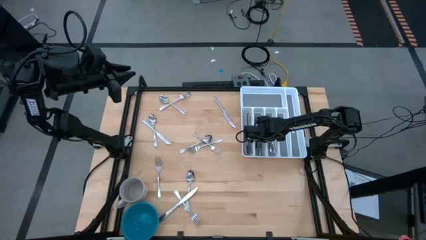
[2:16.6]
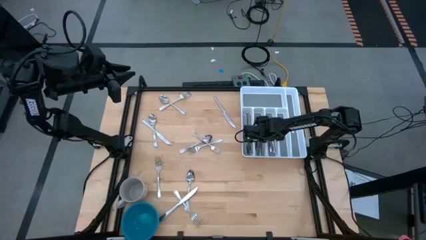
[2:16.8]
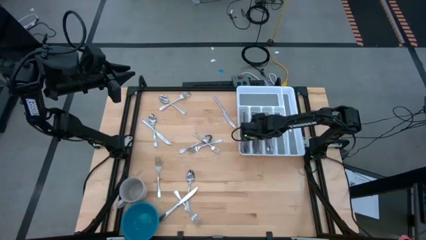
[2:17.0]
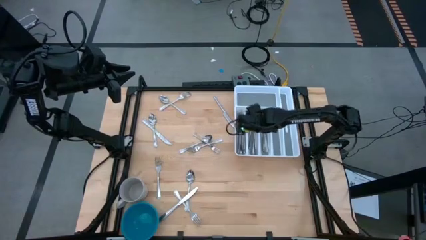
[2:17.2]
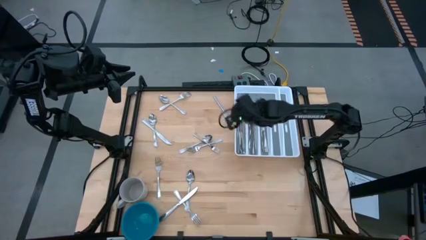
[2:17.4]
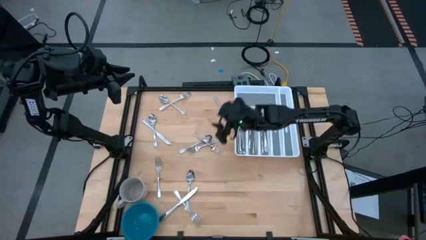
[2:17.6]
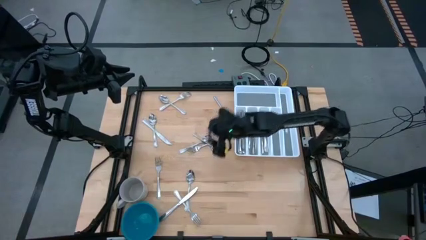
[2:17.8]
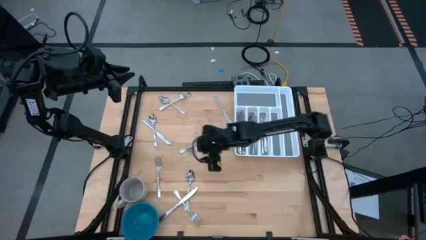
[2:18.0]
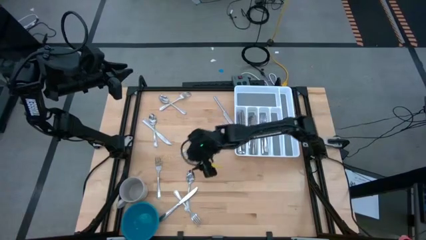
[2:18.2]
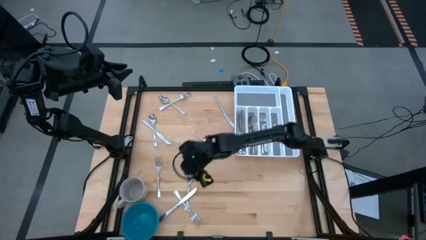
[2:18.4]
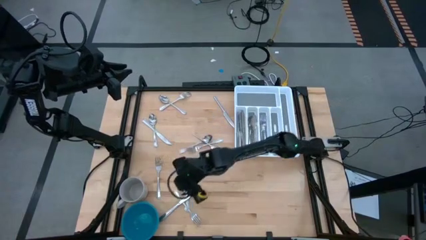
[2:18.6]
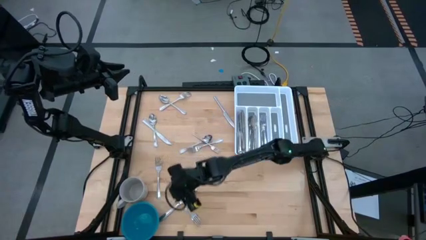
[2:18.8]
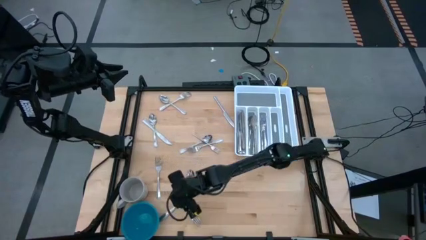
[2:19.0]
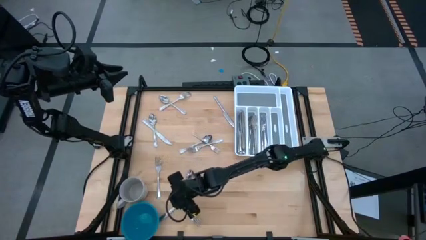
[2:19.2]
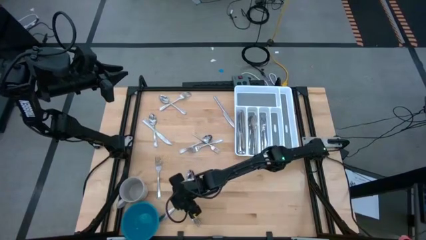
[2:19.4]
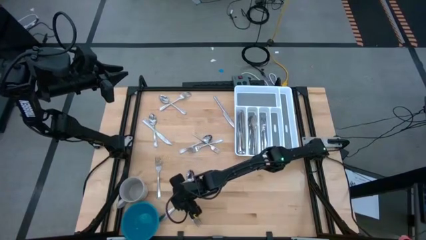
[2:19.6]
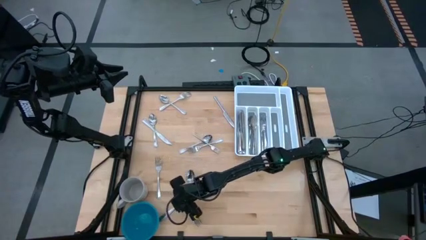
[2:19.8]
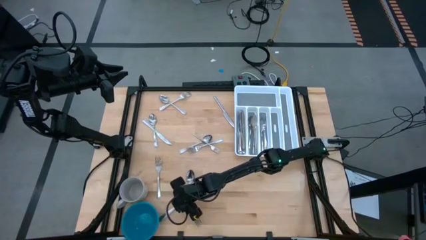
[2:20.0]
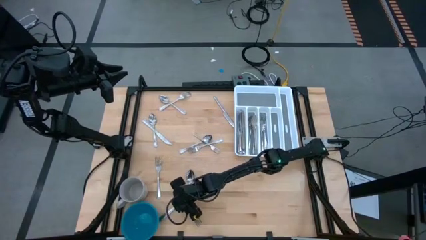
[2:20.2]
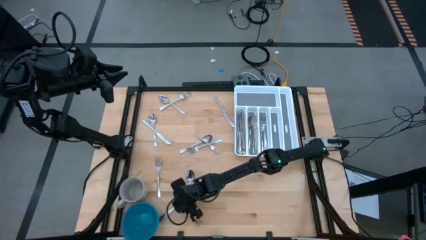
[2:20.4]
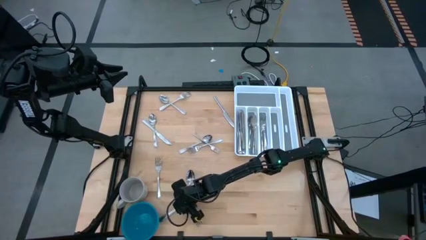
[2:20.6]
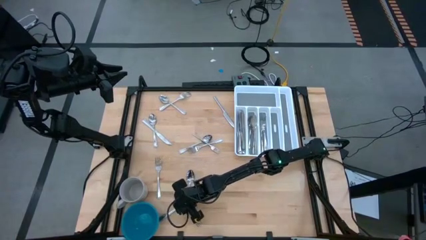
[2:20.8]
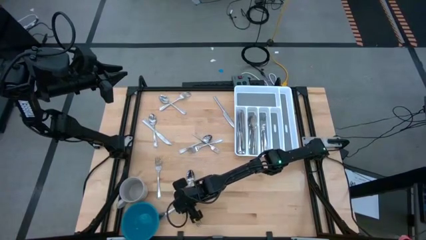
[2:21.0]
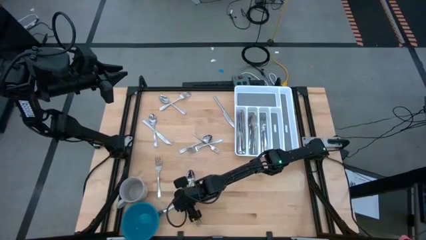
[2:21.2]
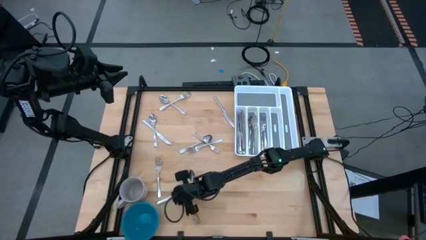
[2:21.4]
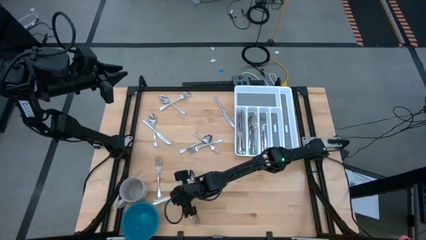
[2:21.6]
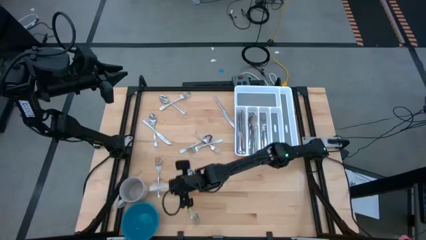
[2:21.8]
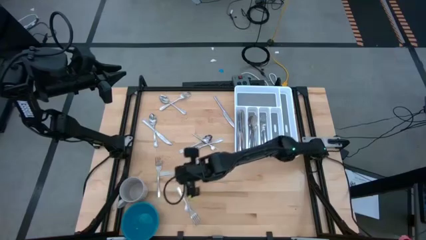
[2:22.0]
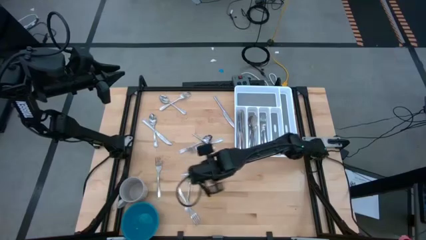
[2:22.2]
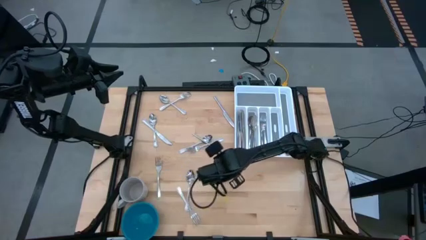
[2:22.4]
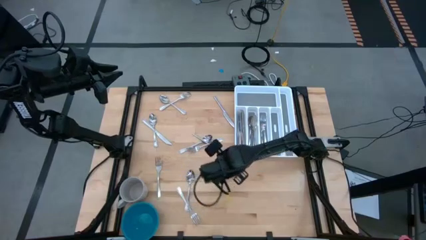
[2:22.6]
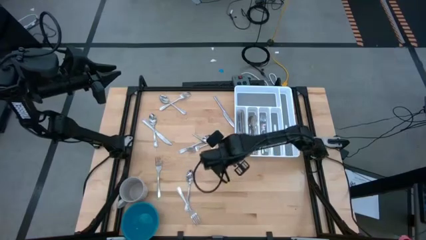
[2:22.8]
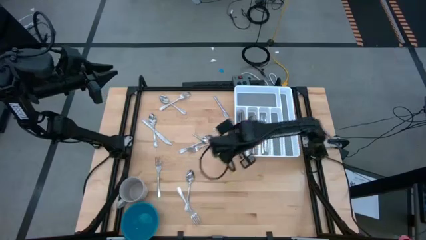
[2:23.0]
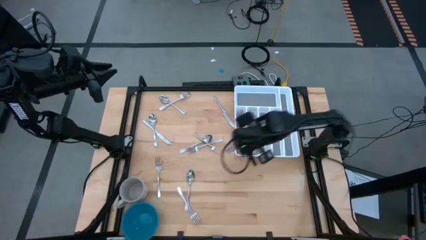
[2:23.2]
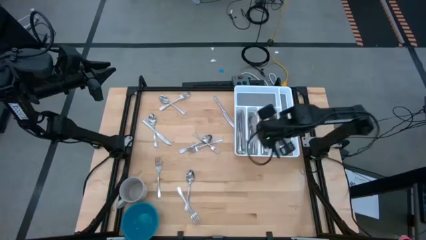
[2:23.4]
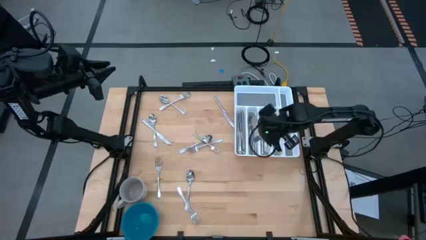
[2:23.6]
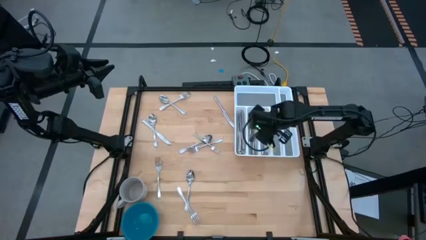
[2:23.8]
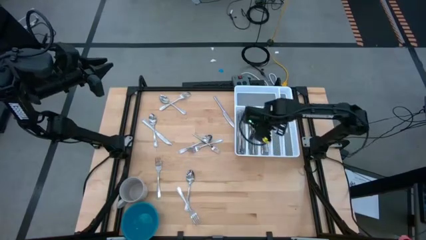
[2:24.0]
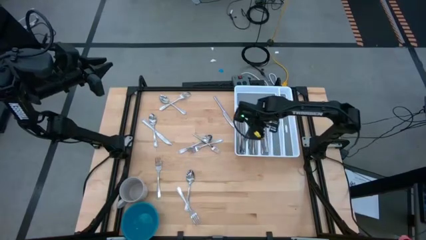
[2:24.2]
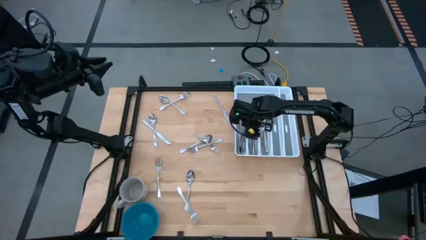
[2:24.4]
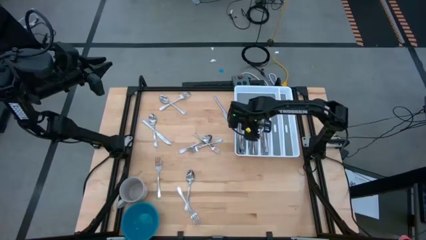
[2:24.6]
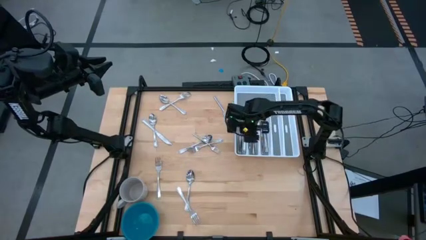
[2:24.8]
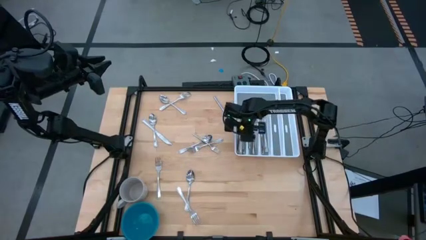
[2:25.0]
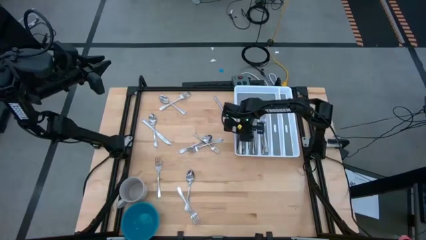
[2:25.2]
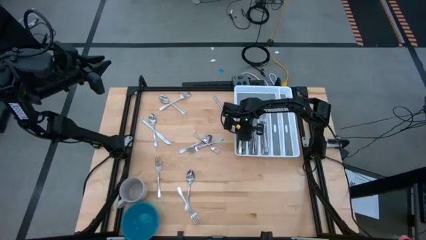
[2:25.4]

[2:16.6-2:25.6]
Task: Sort silverware
Put the table knife into the silverware tray

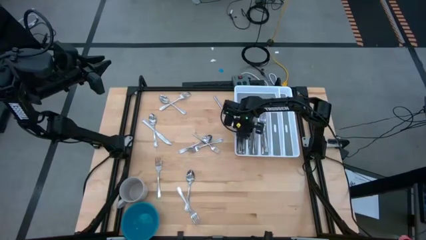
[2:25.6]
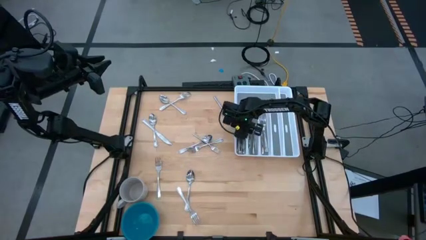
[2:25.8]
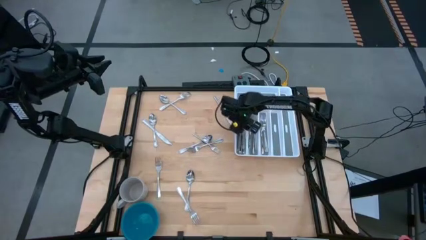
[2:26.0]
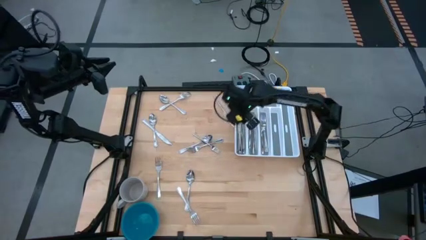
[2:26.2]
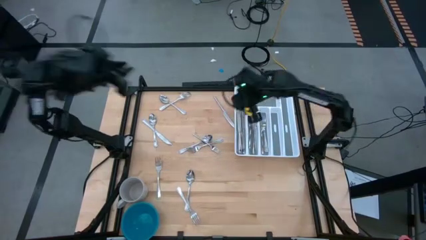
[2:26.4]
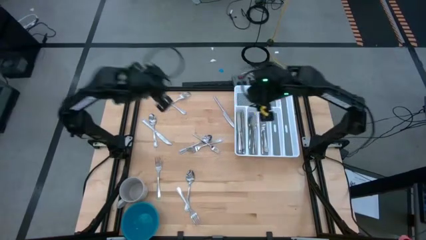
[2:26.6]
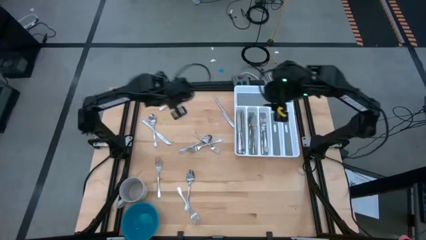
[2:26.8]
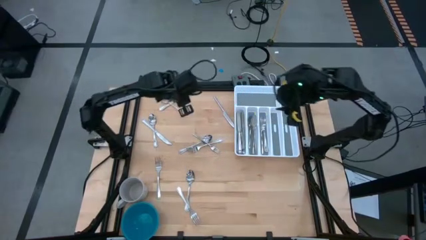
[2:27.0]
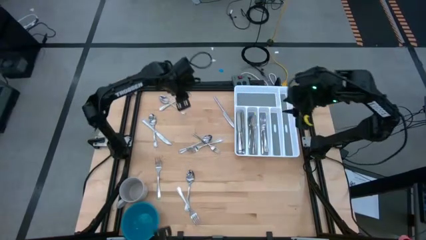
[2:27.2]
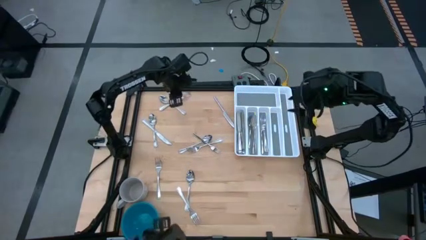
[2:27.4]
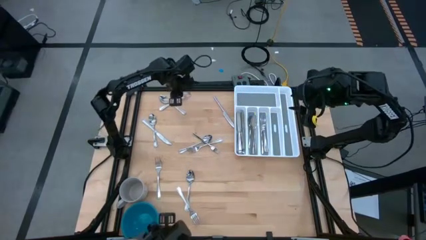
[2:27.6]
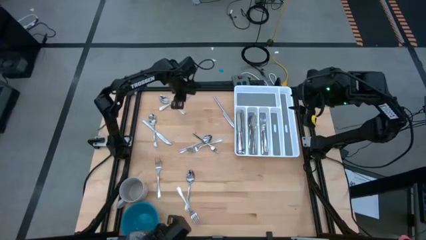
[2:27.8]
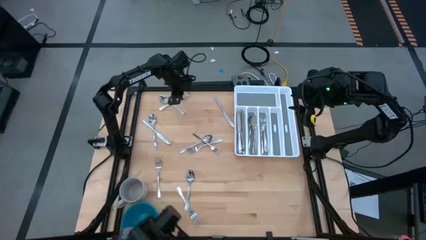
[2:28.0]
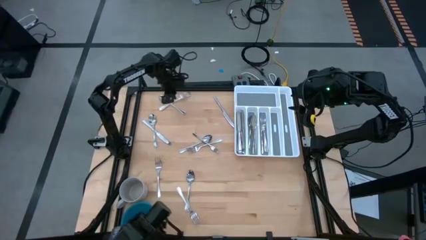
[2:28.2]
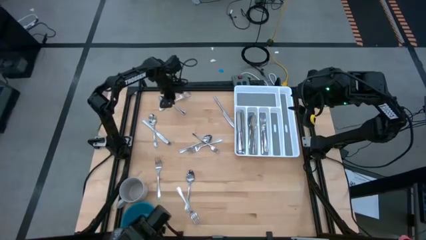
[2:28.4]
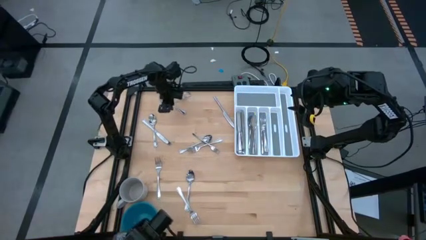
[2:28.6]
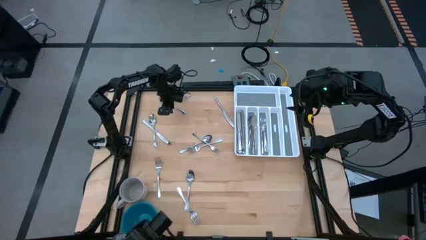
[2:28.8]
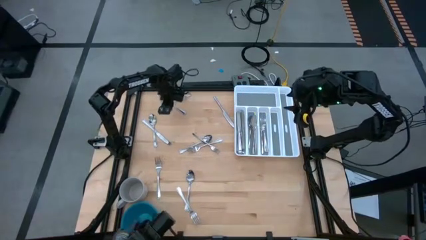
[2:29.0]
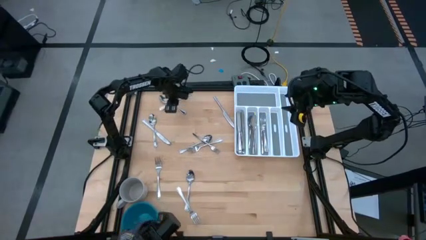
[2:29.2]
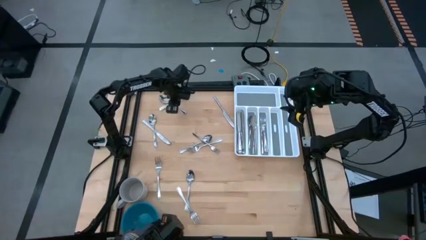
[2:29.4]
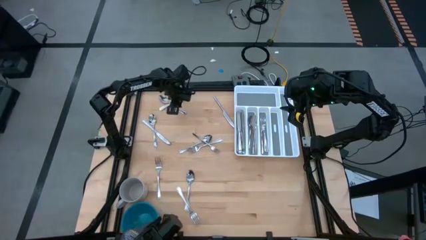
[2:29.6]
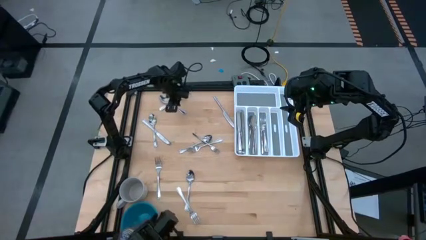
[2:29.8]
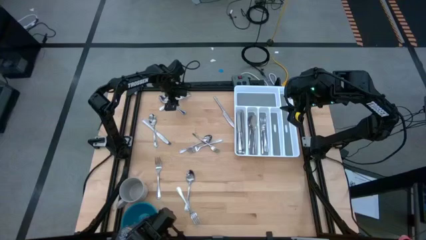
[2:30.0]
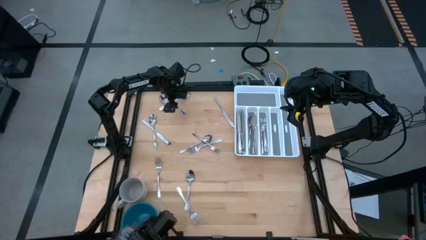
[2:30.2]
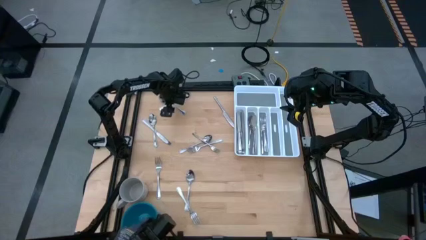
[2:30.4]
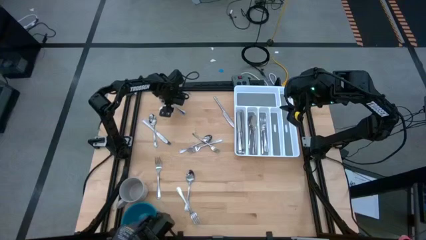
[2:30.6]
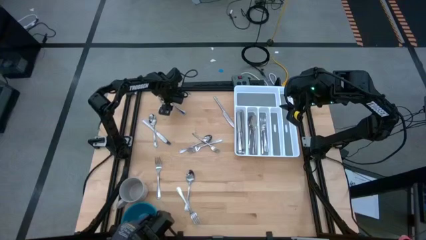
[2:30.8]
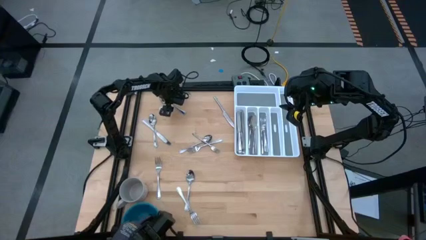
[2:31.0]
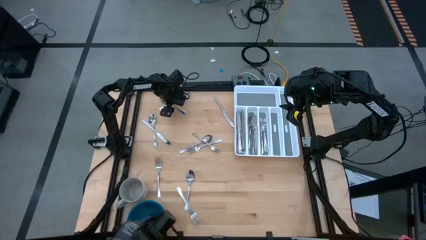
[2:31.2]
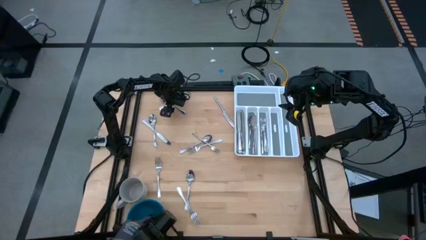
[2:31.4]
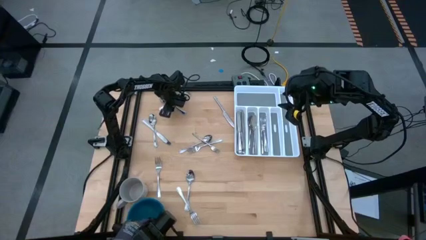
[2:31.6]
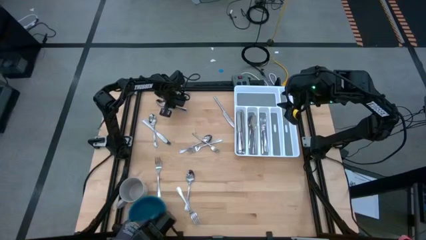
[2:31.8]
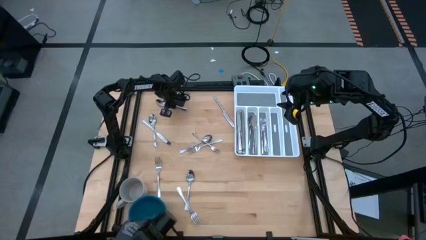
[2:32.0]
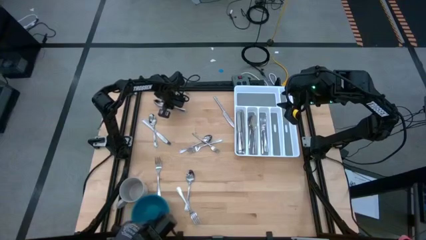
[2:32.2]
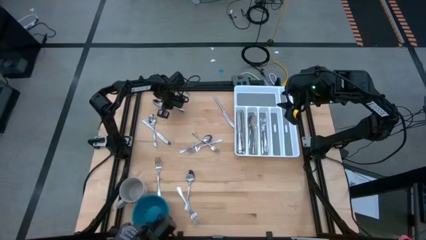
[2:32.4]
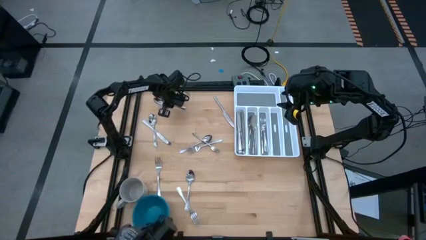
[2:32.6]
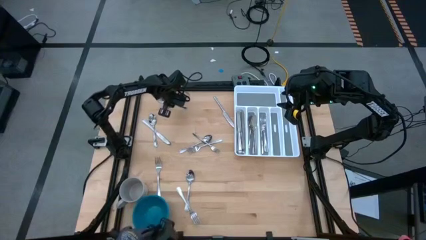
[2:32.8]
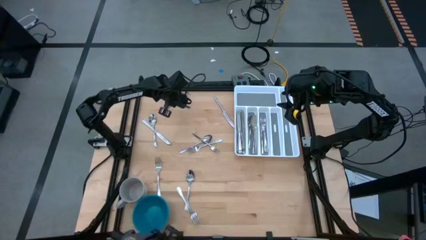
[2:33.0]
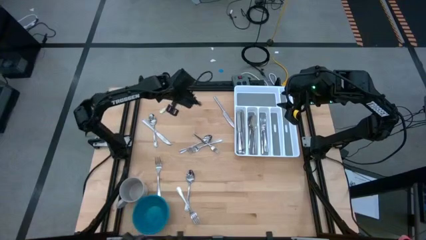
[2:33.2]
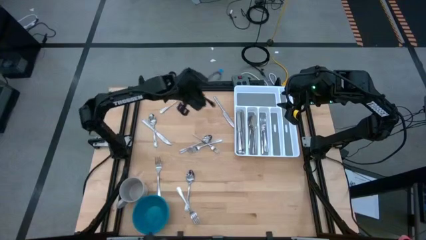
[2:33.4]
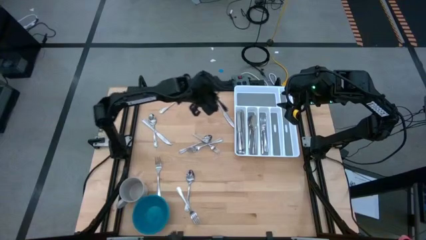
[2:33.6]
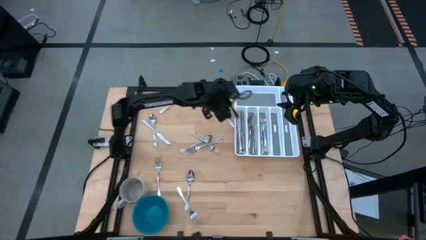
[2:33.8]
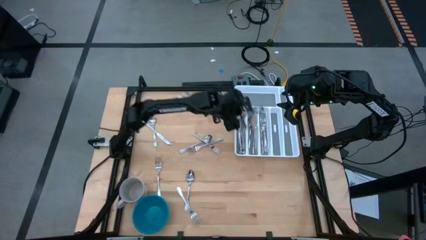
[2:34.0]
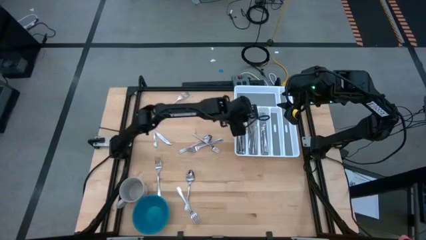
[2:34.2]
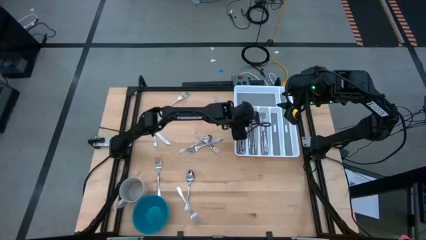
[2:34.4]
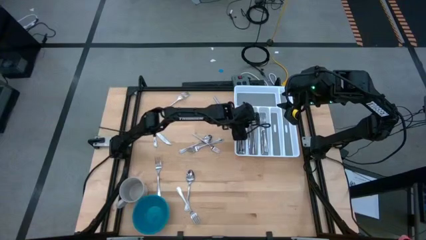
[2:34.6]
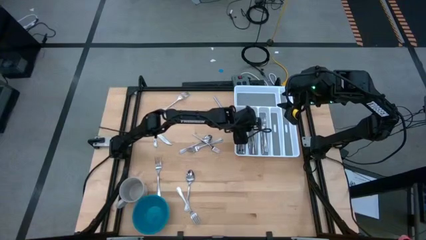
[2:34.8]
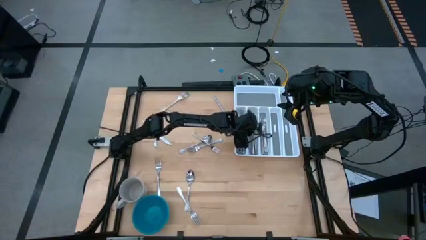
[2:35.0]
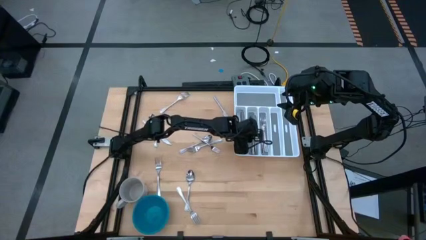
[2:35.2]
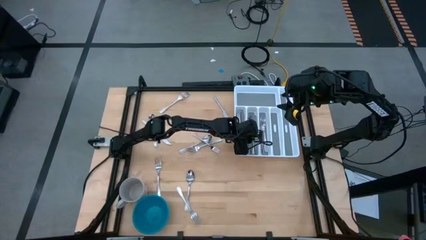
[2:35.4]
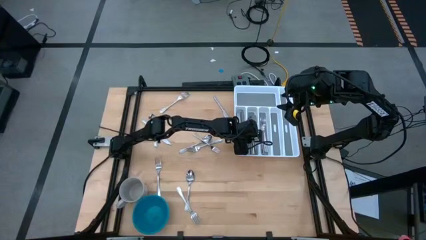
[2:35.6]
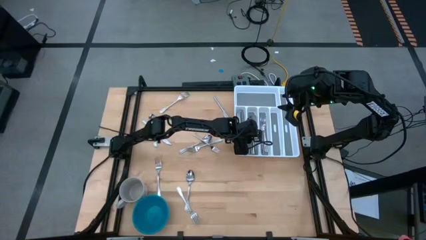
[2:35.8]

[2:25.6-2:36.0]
Put the spoon into the silverware tray
